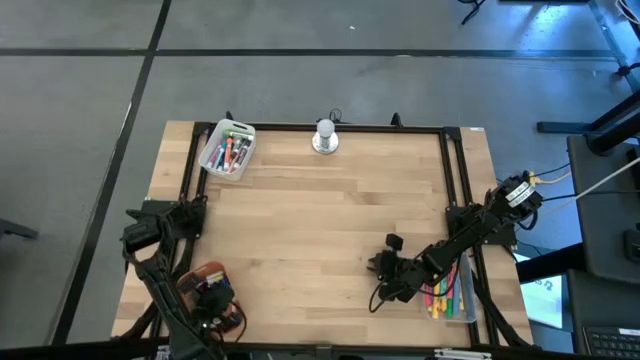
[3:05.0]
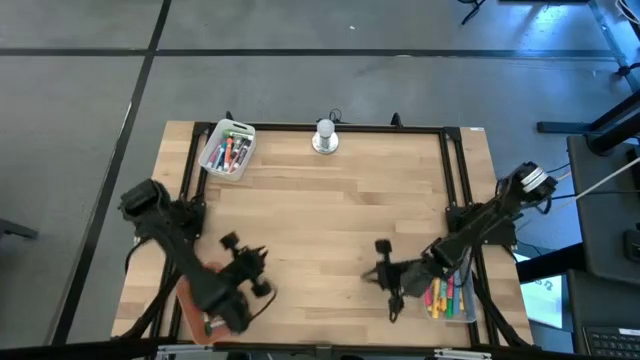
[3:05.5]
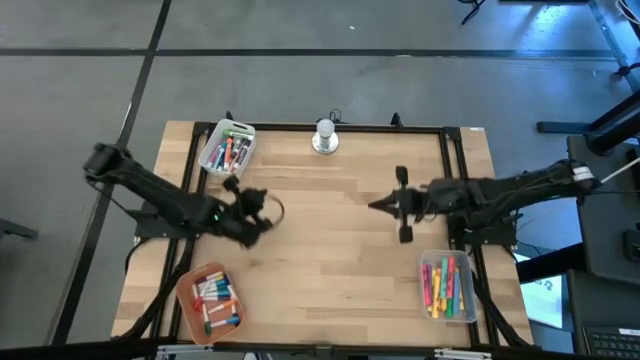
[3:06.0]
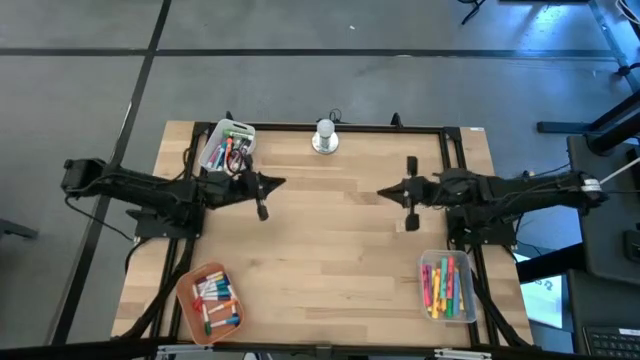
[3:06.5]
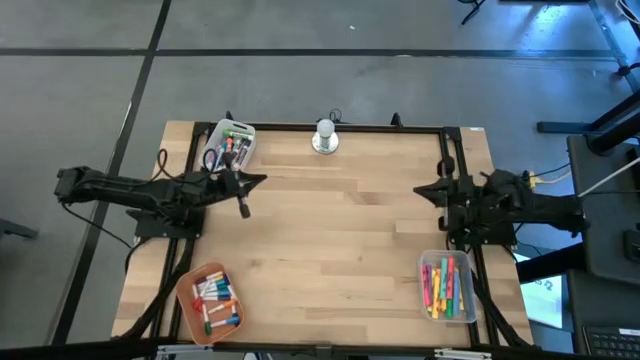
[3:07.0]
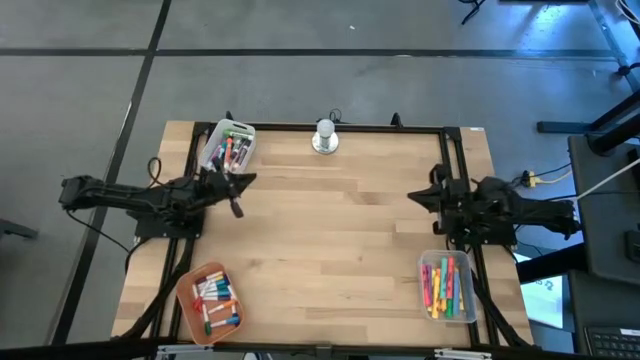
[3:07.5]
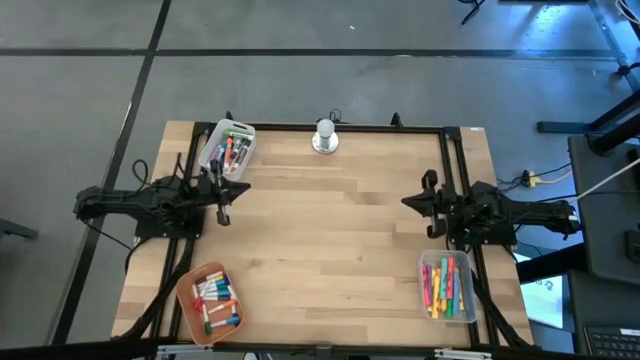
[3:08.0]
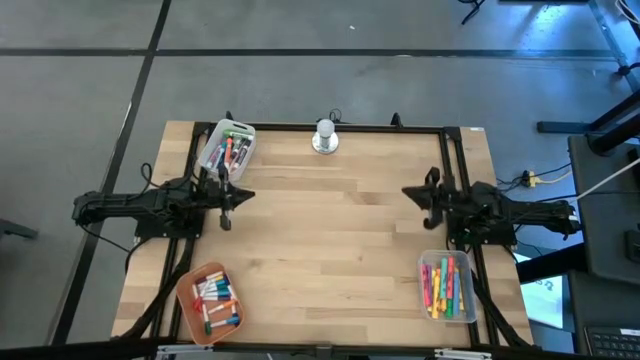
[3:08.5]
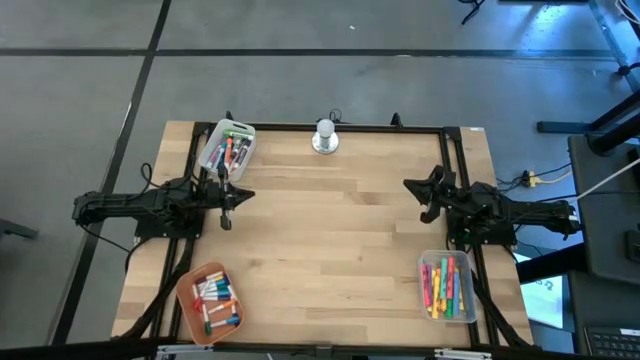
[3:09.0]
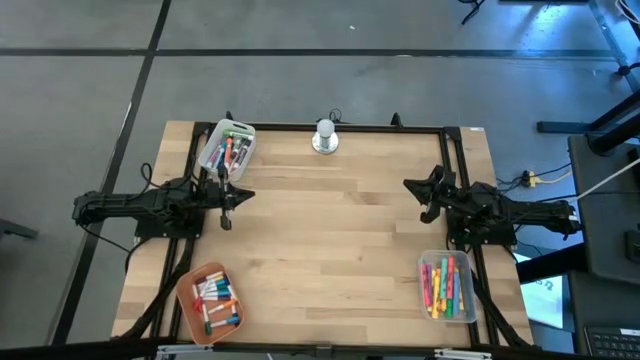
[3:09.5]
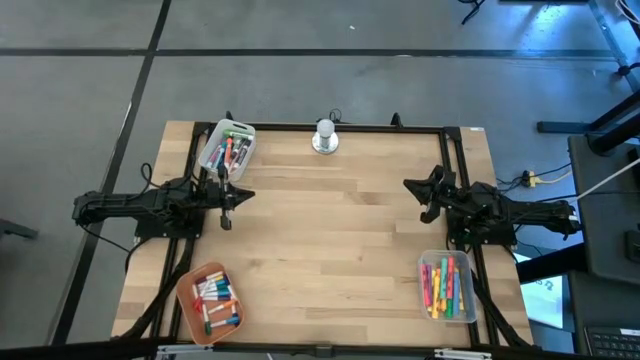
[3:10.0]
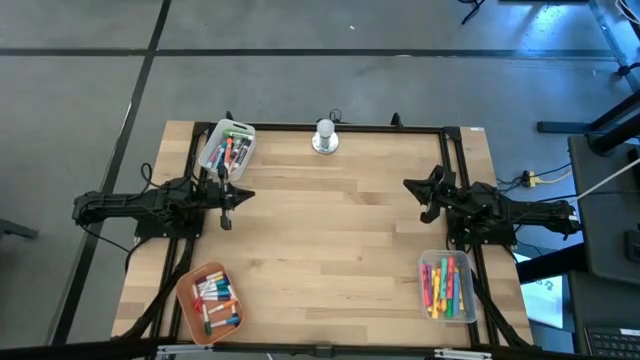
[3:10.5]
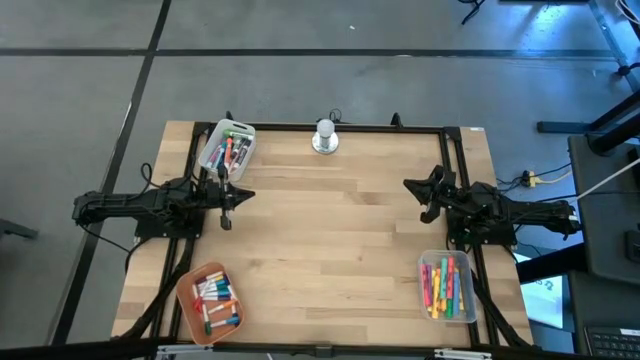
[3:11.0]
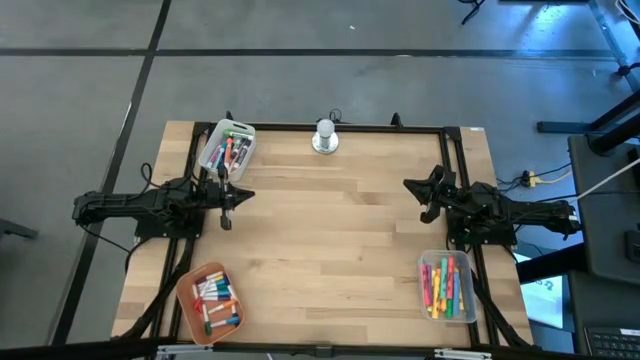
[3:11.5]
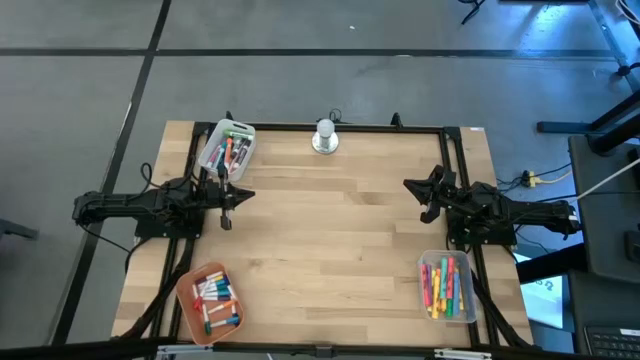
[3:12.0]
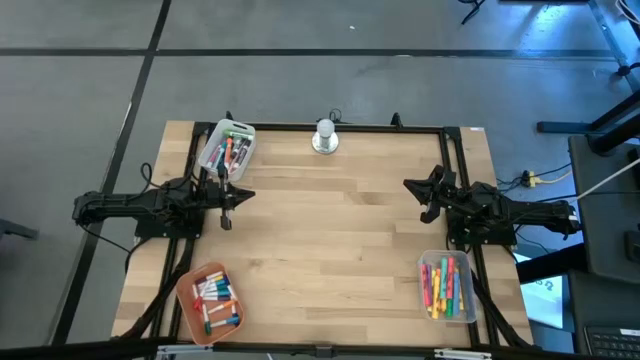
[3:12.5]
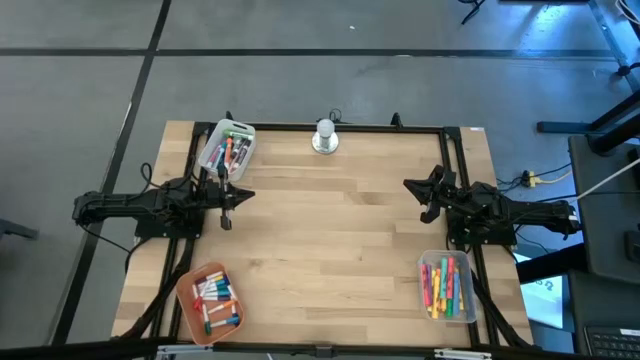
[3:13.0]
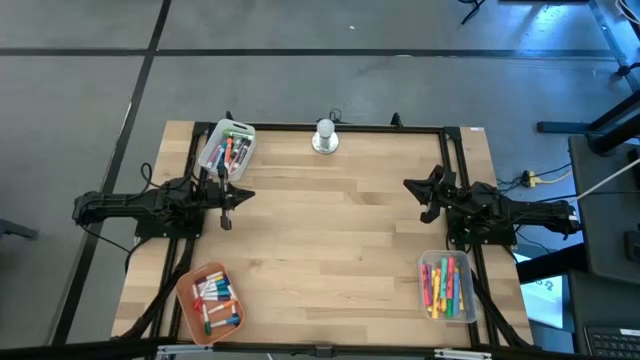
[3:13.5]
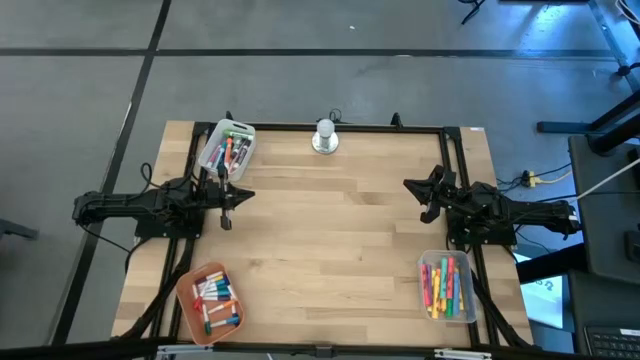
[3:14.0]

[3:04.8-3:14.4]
Task: Pick & Place Markers
Return to Home Position

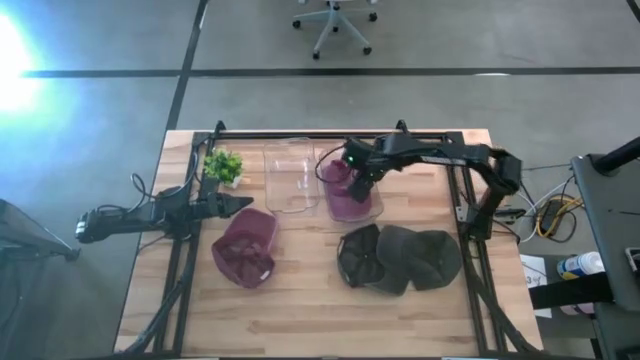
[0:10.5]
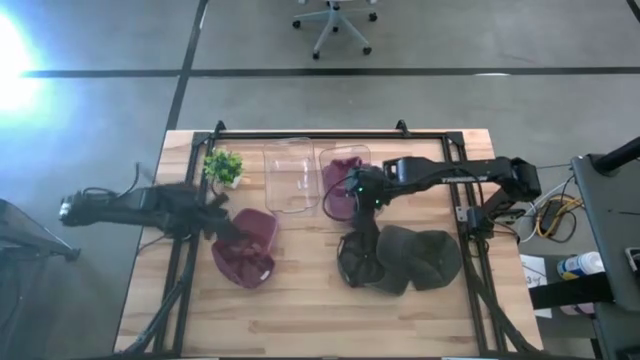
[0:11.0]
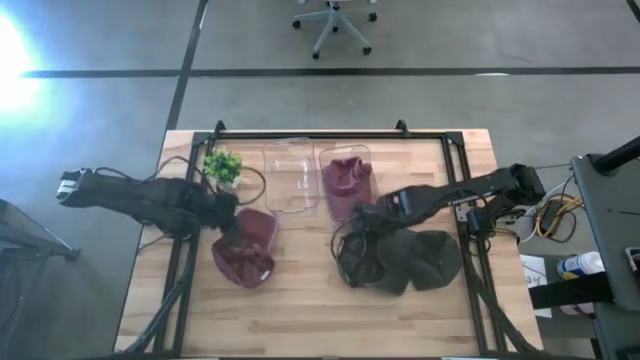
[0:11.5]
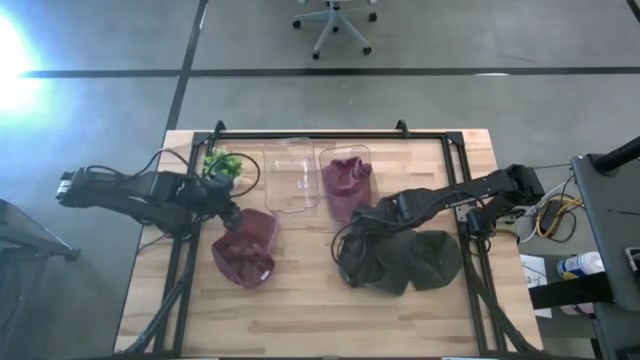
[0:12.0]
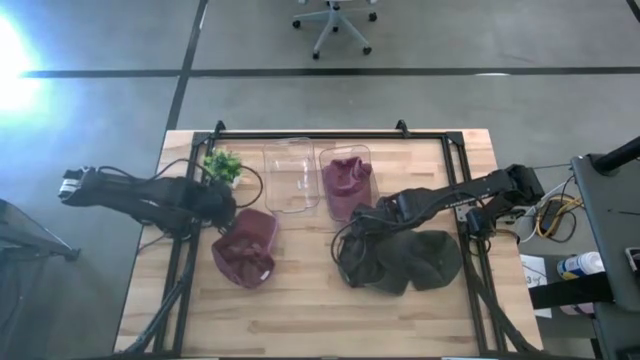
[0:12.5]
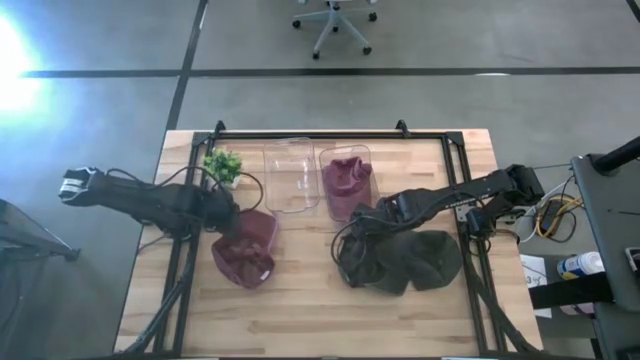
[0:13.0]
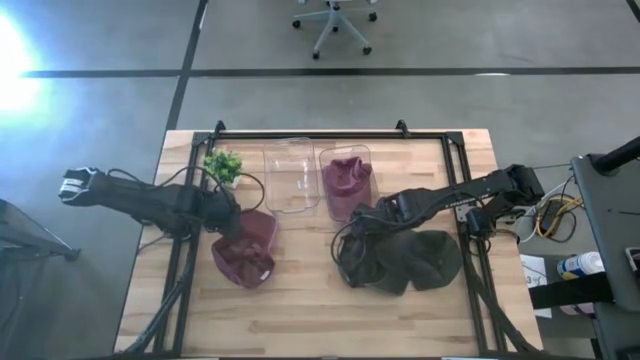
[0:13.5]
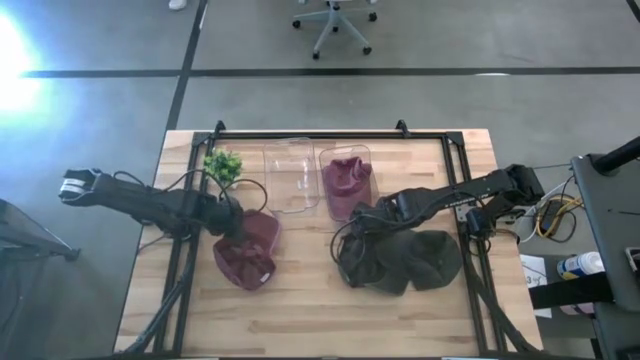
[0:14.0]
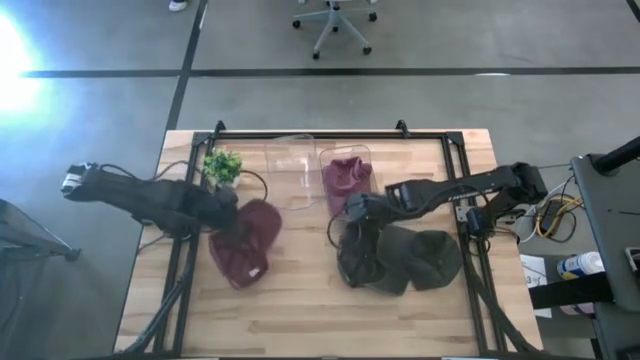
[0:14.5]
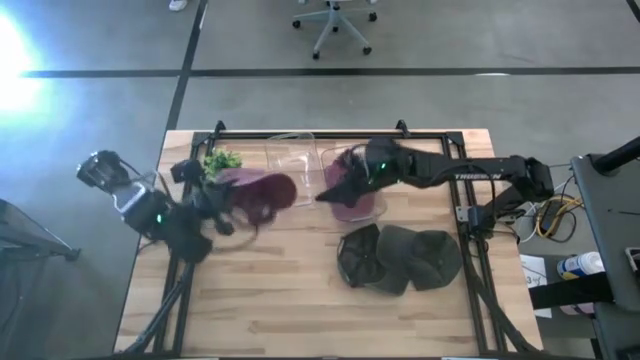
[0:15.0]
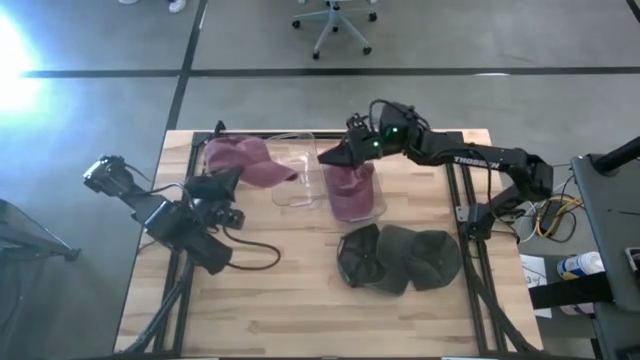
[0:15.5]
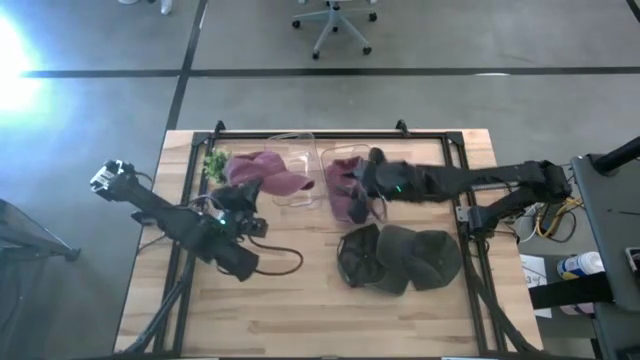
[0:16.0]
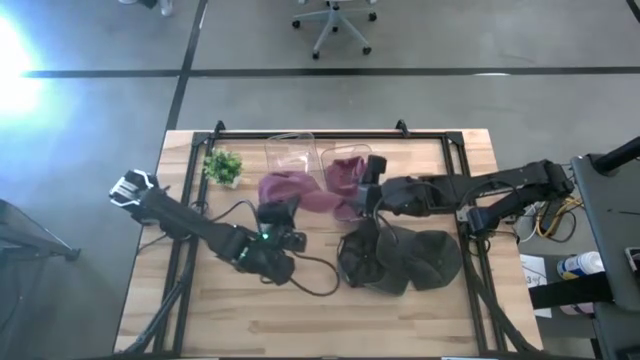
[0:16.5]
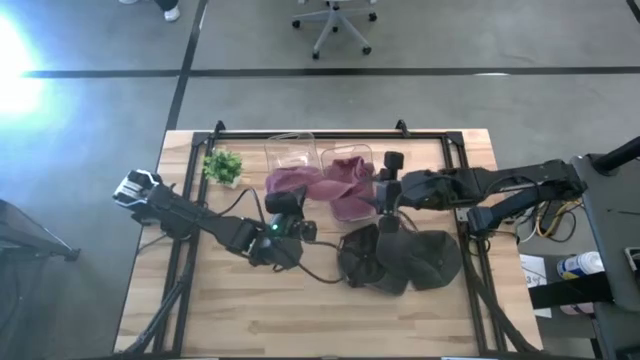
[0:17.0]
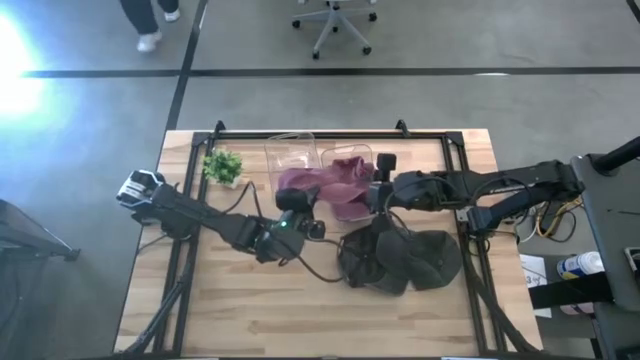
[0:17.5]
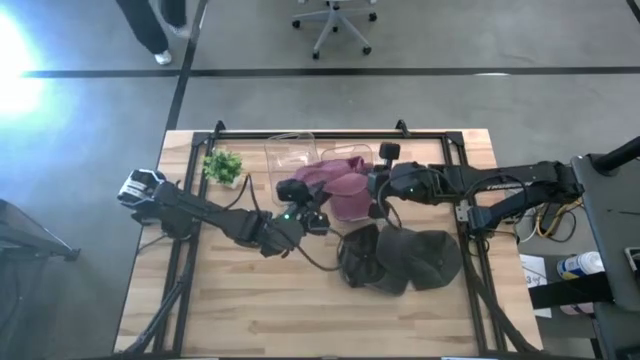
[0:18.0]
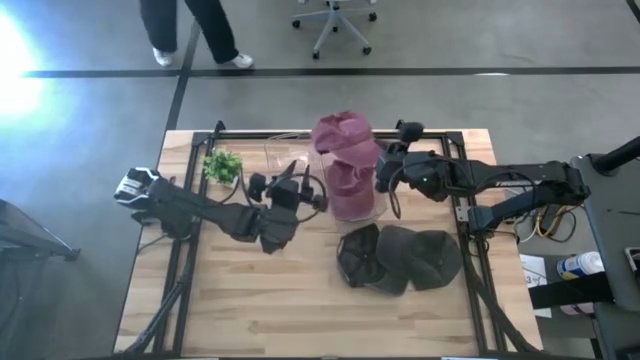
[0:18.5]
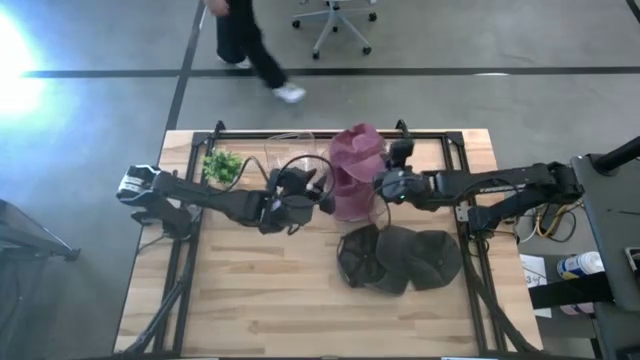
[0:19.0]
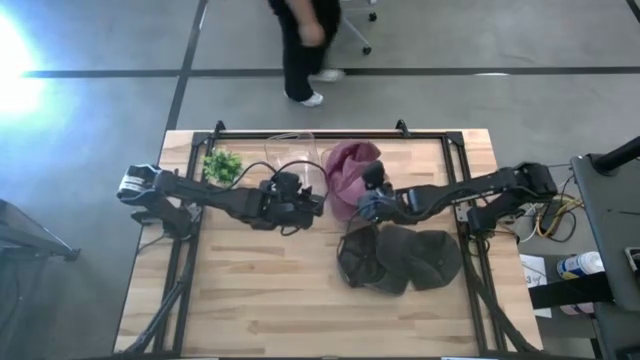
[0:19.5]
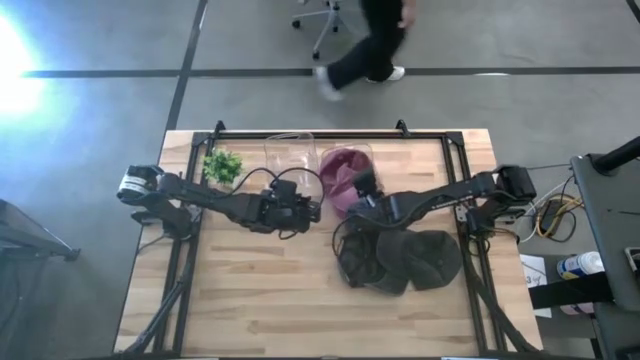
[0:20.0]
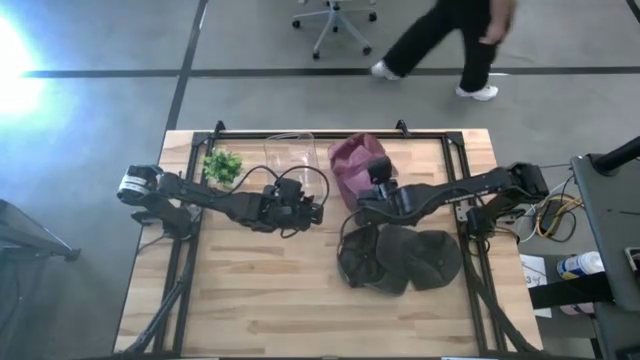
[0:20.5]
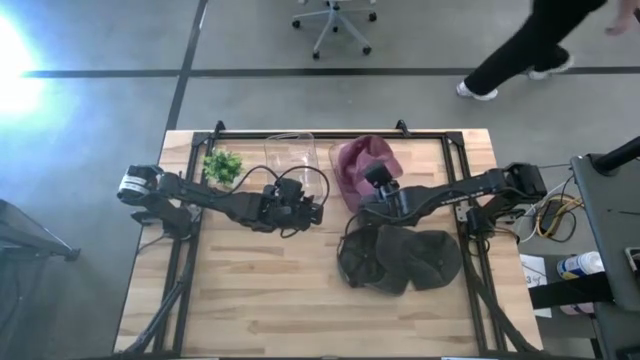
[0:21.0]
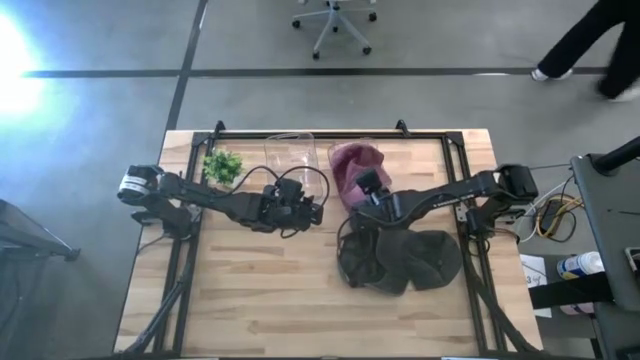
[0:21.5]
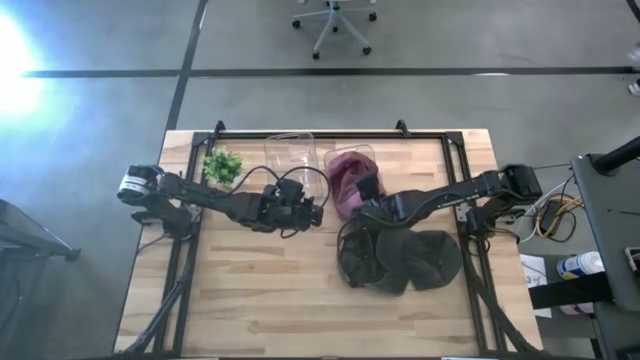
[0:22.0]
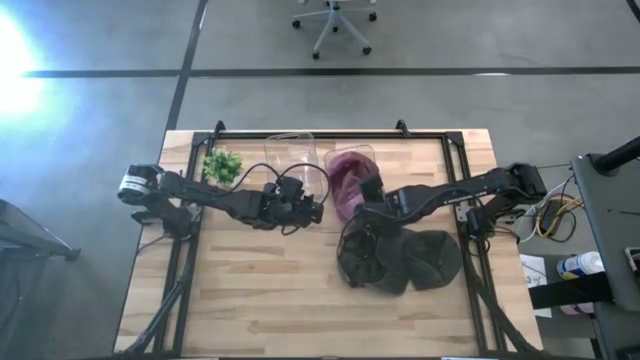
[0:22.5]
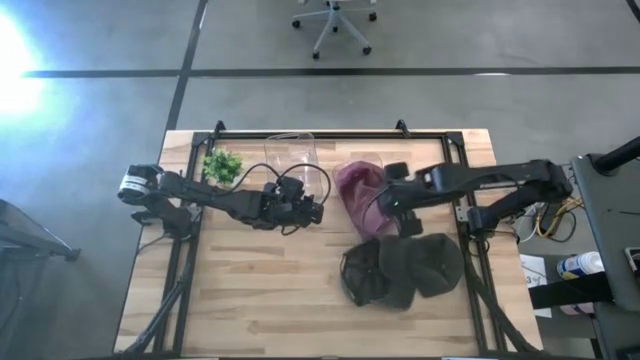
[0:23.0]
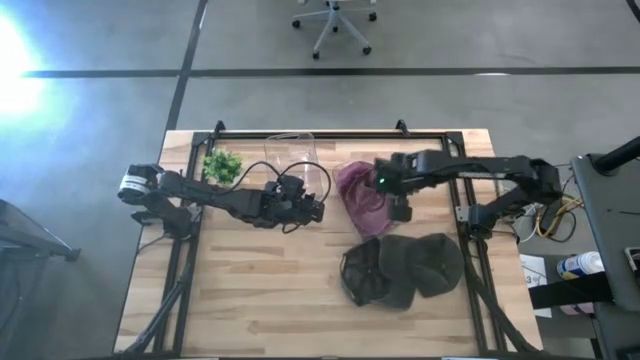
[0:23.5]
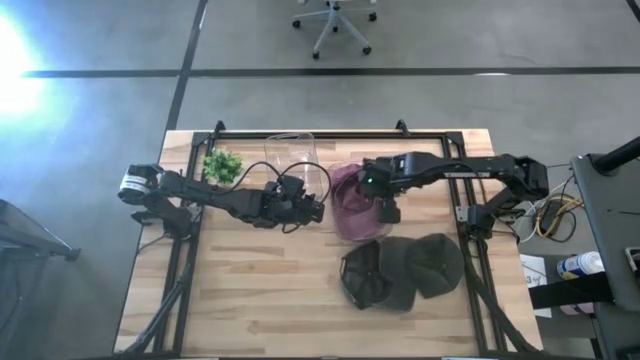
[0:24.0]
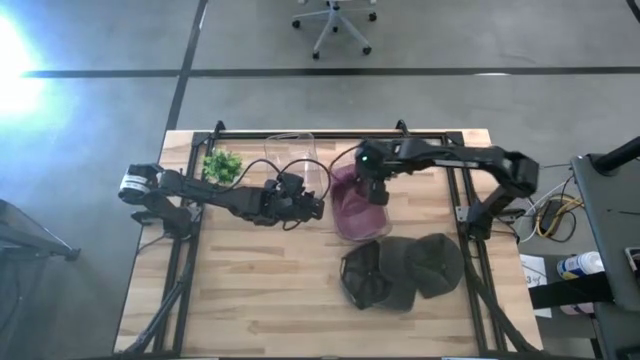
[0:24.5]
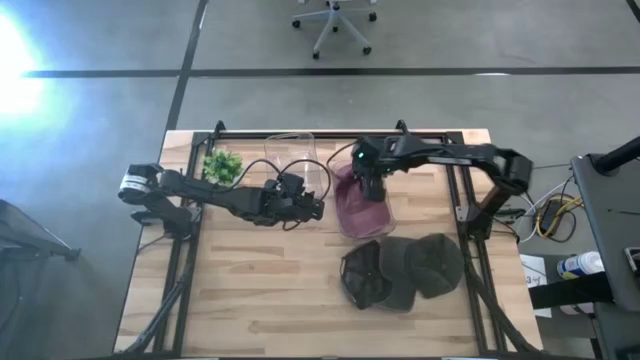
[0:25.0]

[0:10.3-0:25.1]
Task: Pick & Place hat
Put the red cap into the right transparent bin
